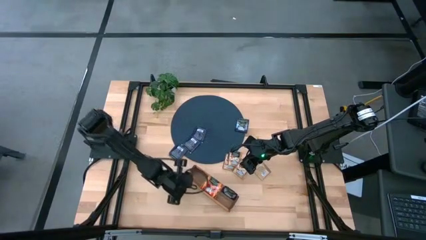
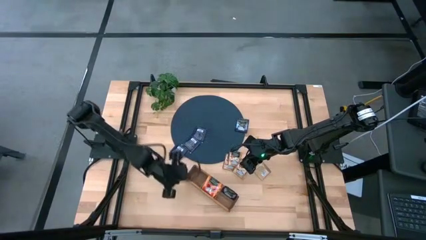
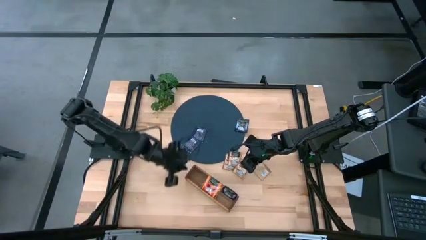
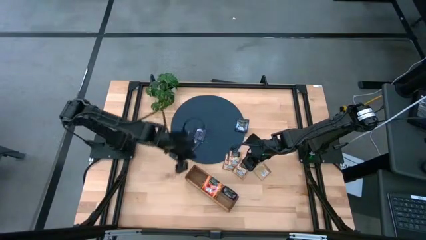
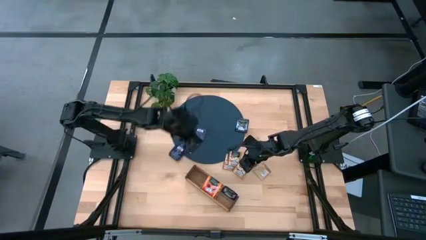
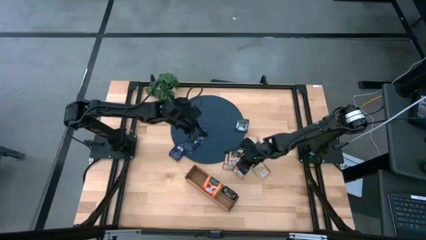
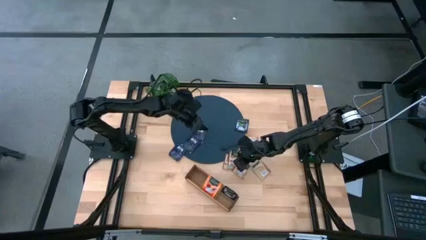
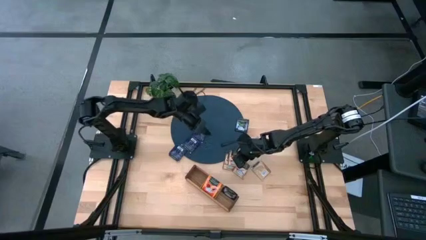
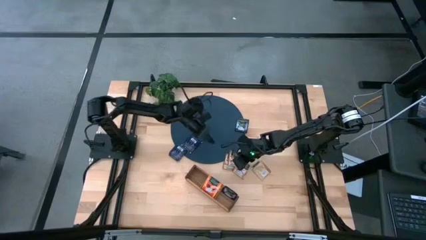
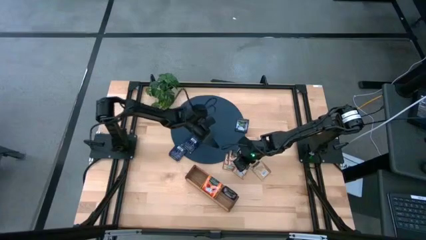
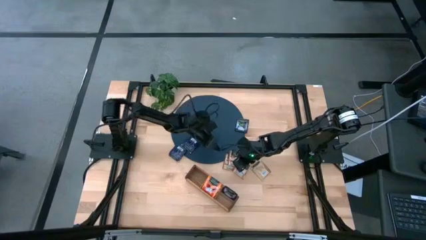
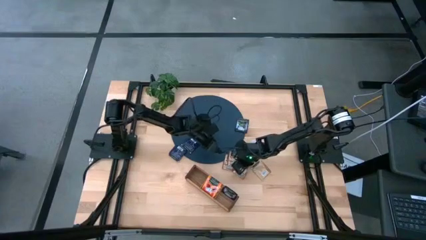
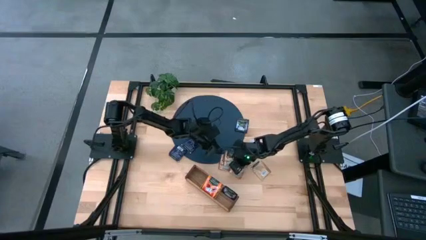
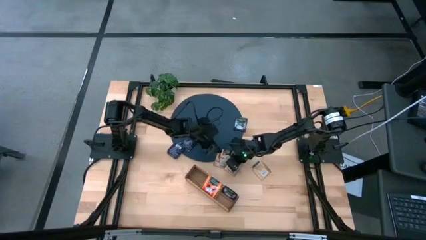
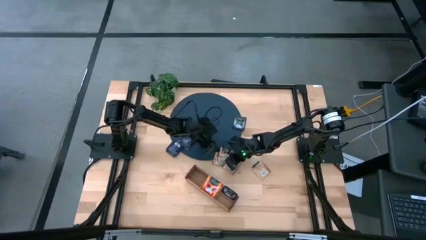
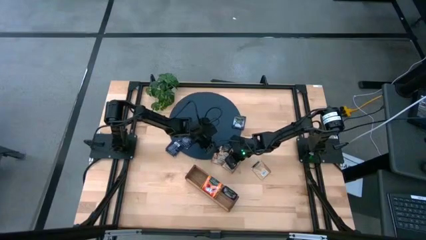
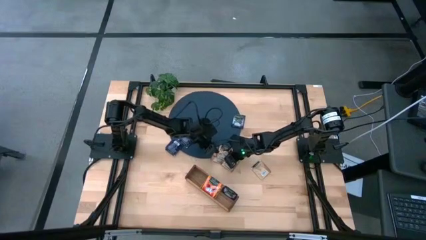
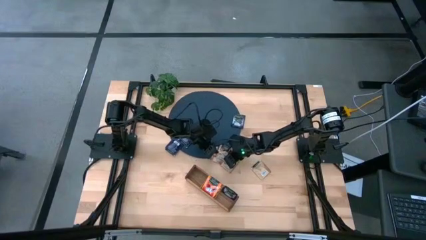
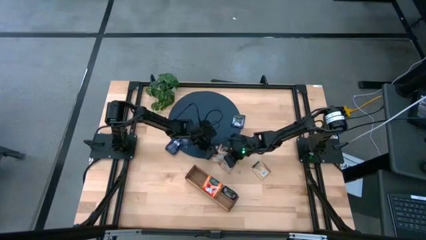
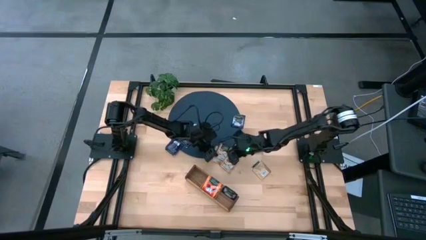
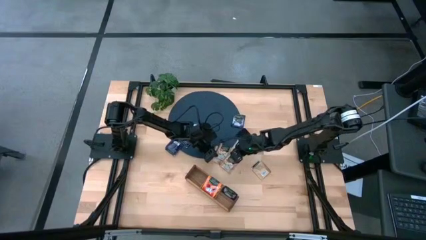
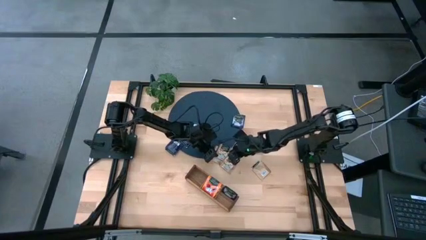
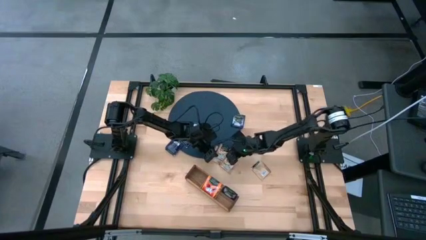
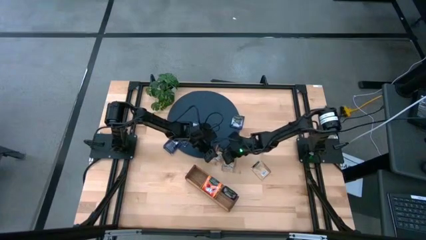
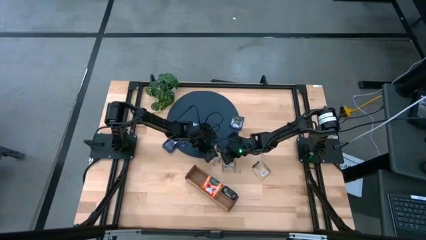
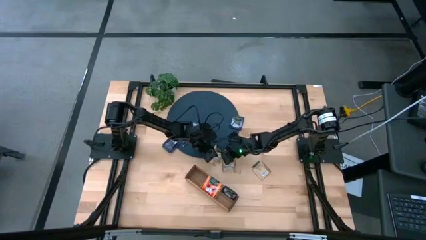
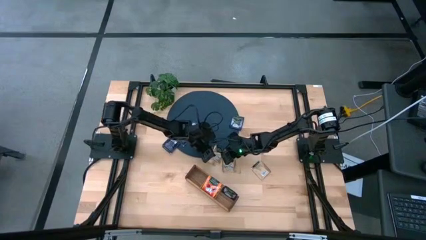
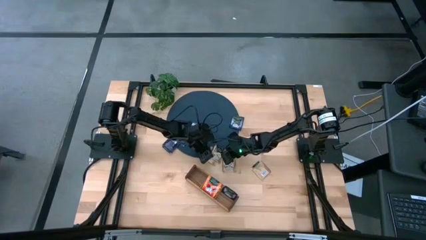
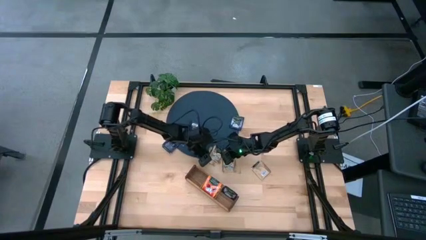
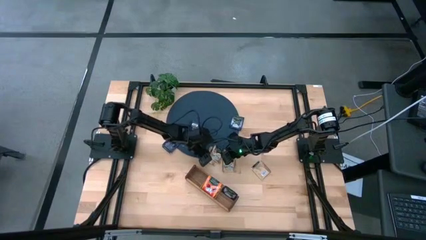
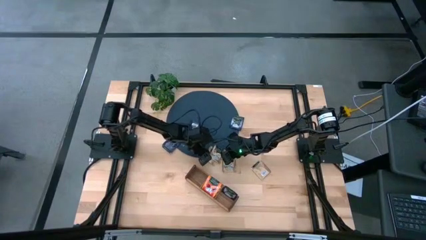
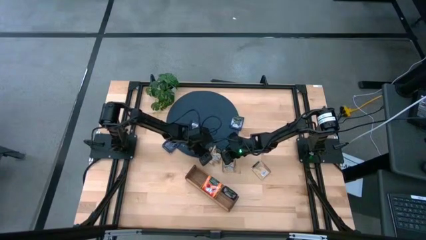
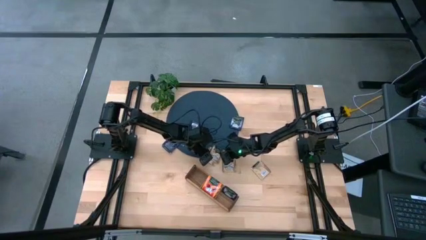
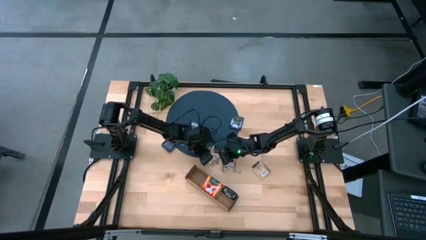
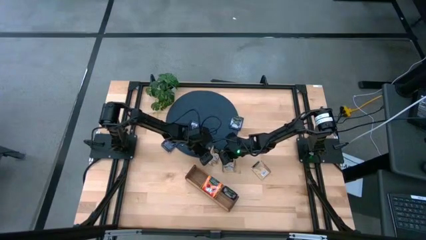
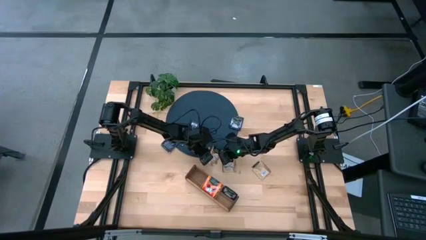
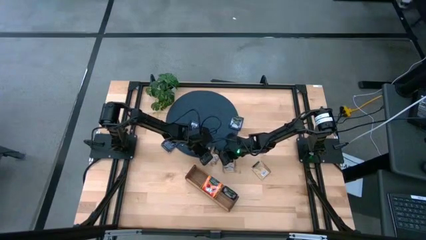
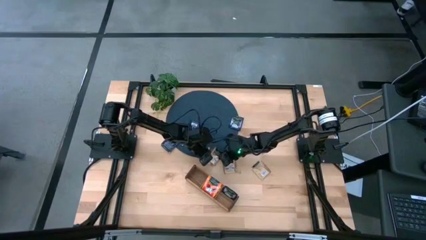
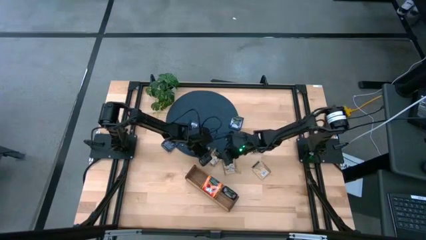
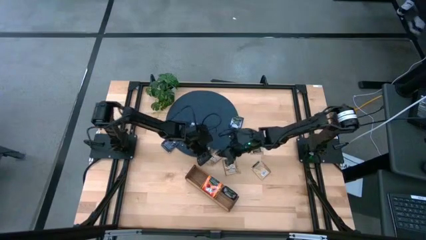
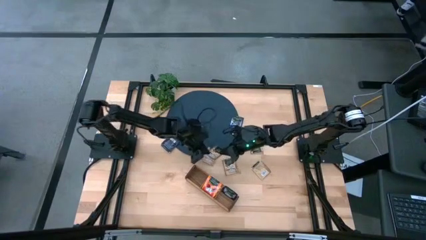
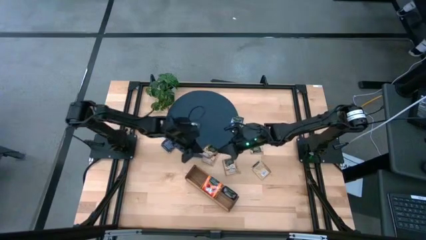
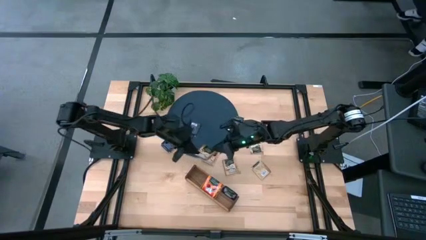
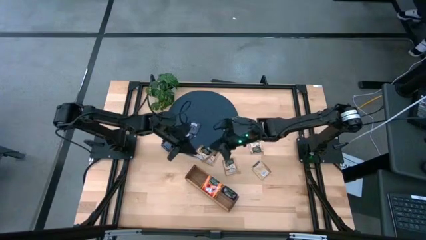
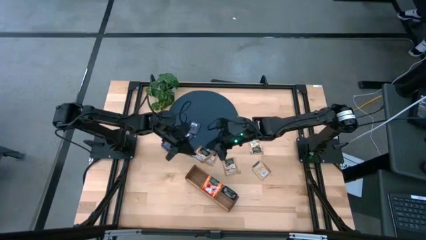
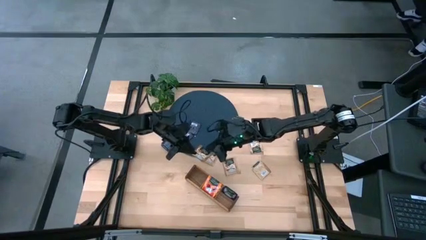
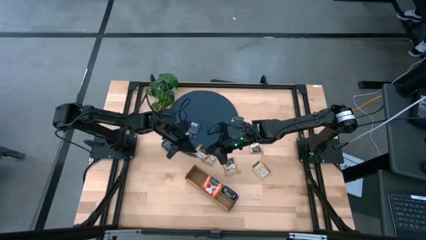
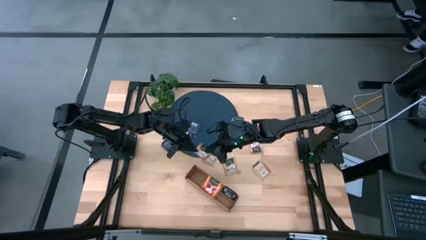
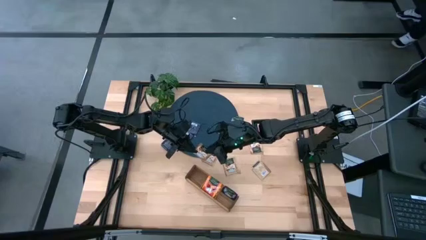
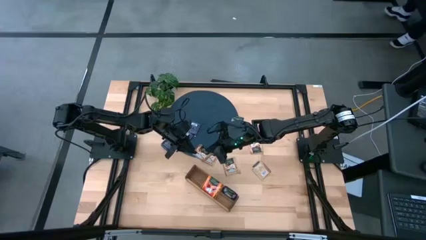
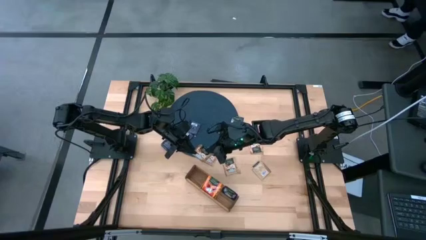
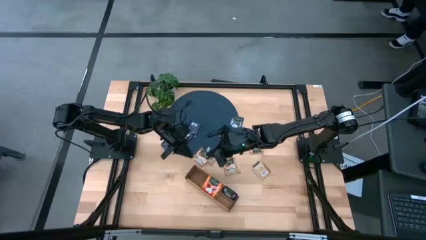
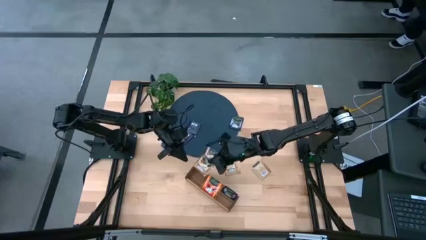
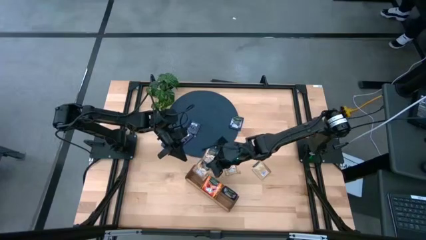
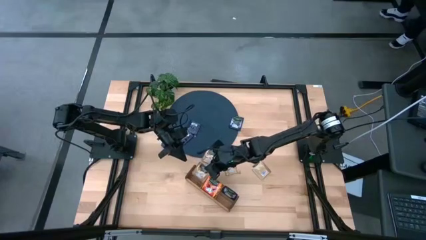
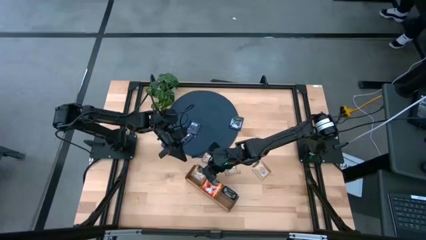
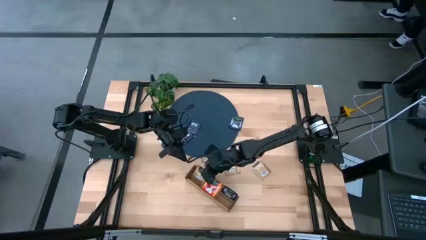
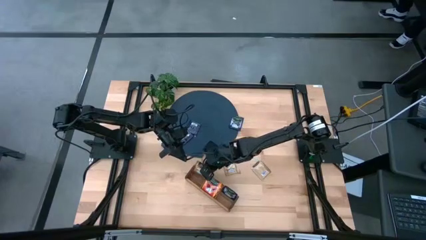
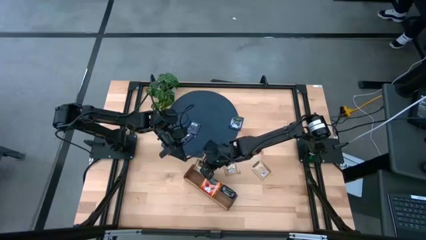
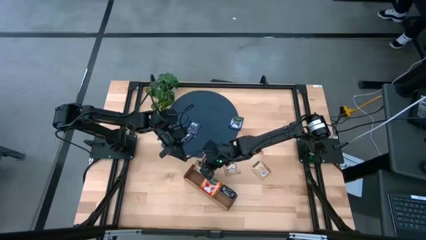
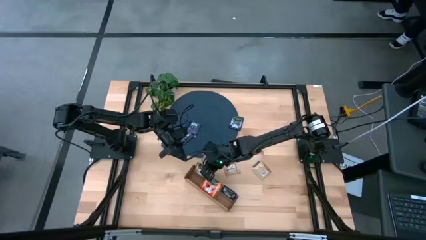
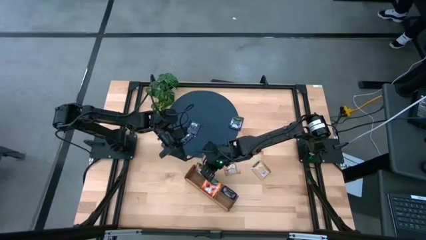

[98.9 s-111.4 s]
Task: Pick & Place Tea
Put the brown tea bag into the left section of the wooden organizer

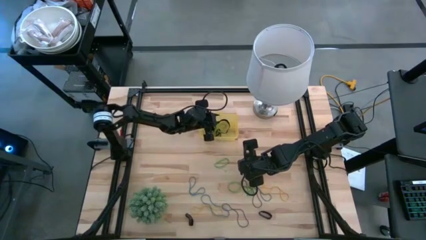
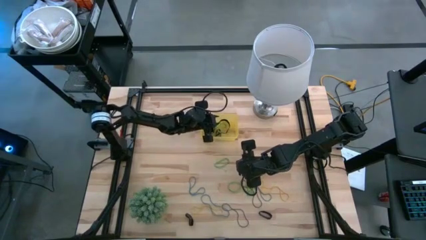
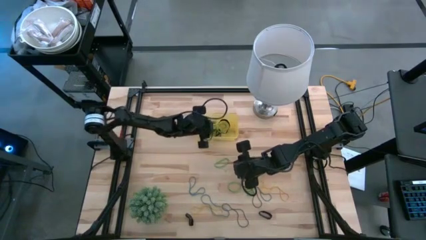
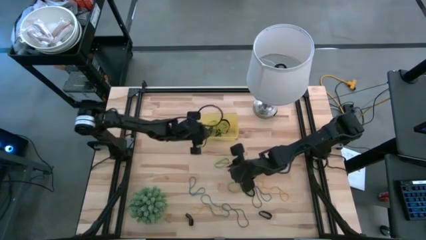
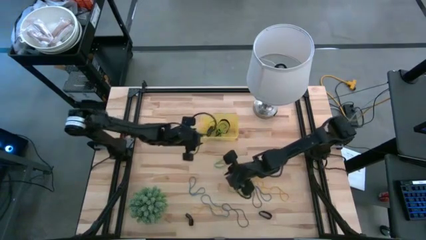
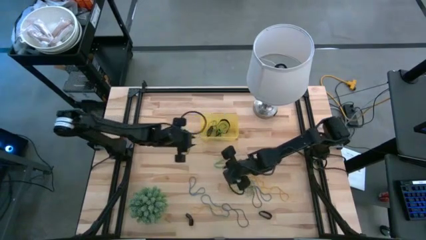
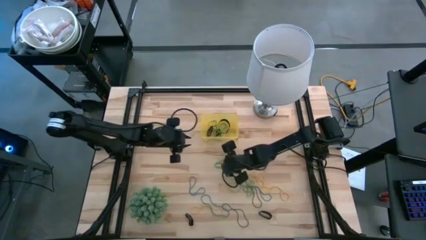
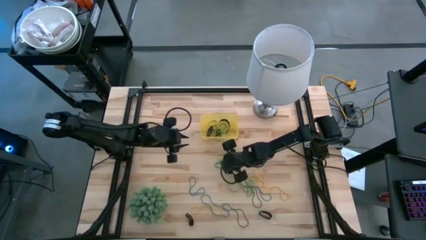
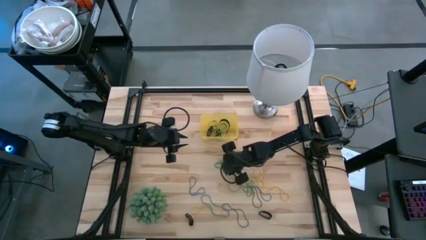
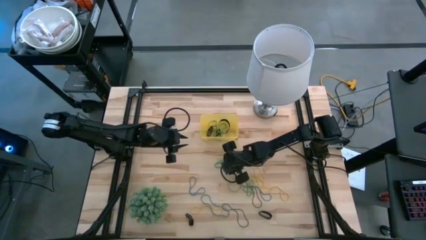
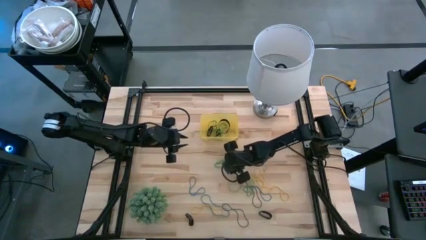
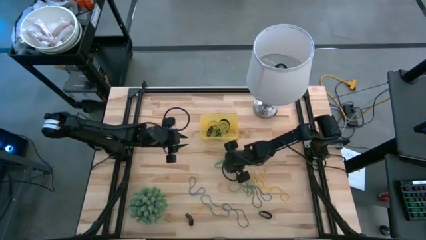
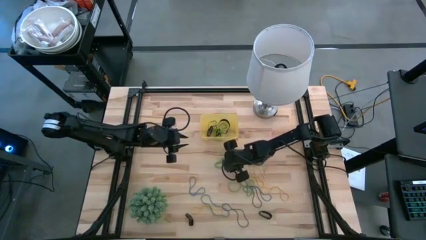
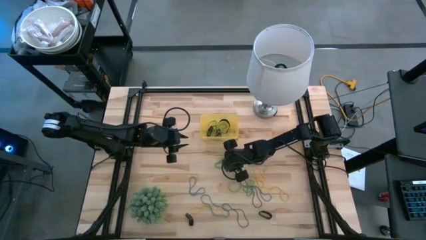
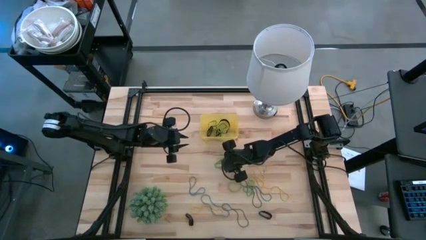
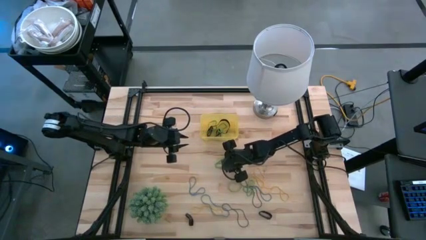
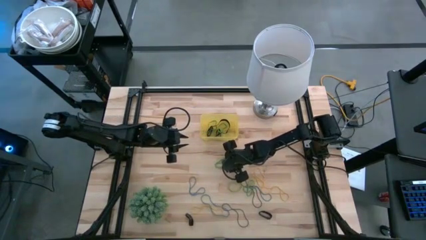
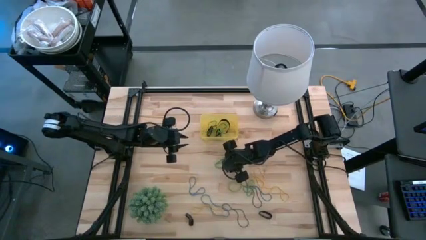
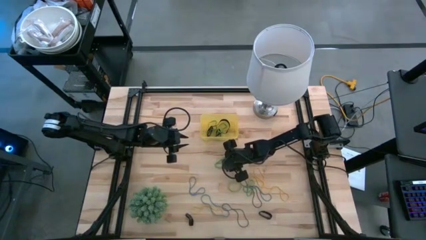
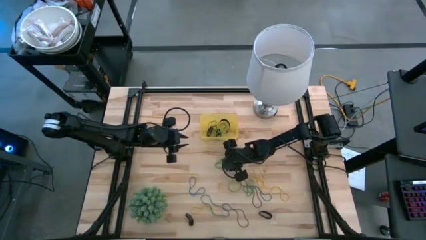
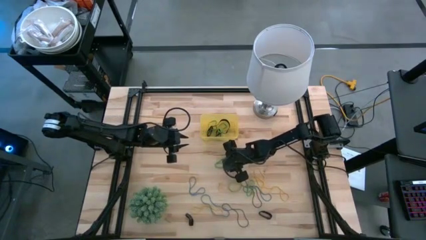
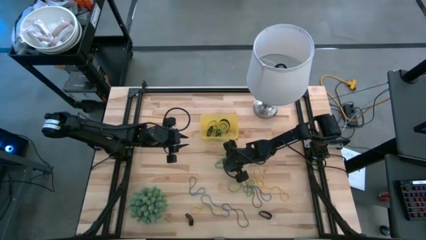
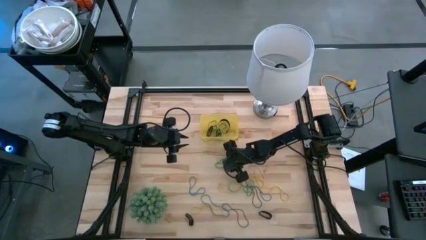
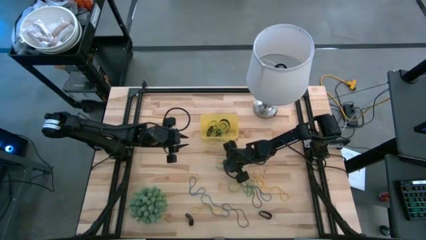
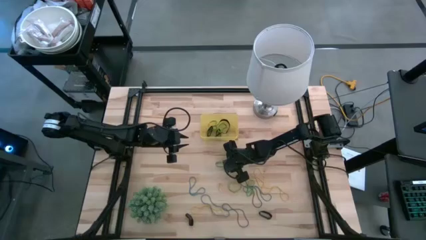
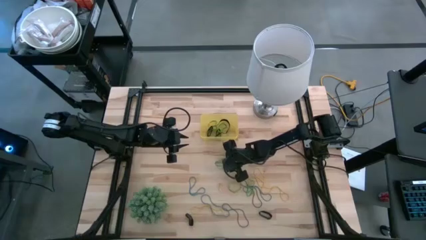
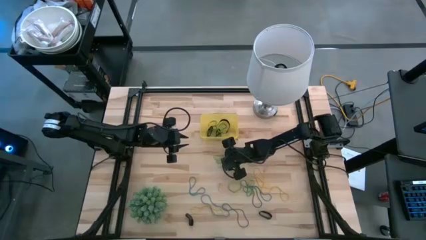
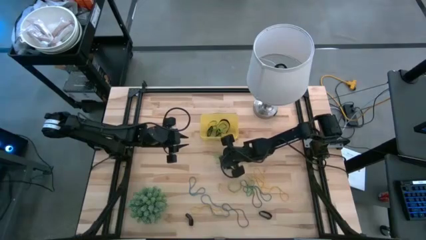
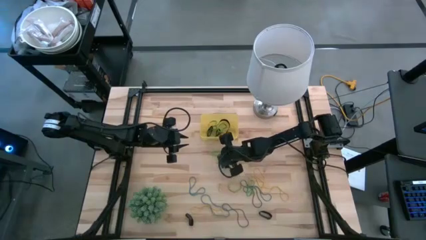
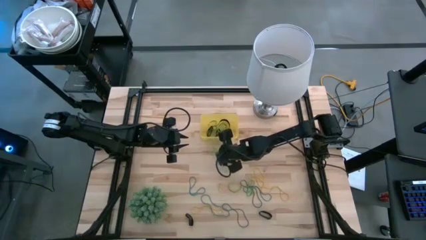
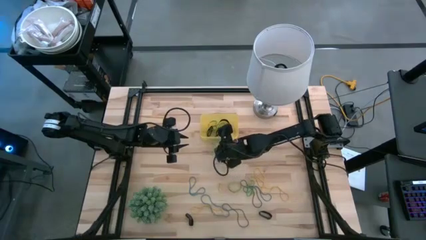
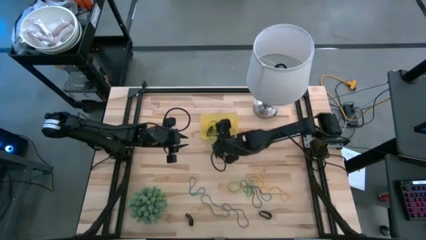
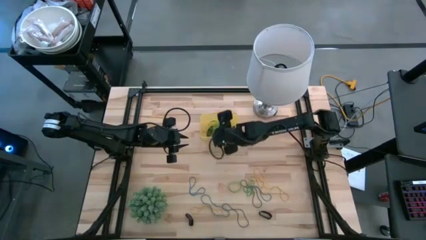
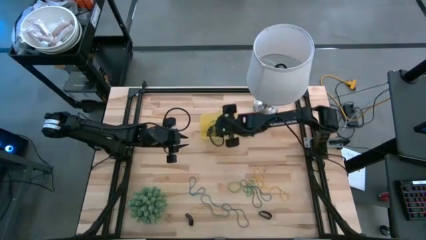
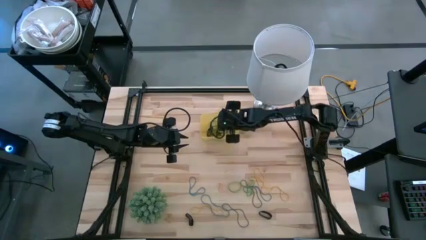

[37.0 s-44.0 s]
Task: Pick and place rubber bands into bin
Put the green rubber band into the yellow bin
